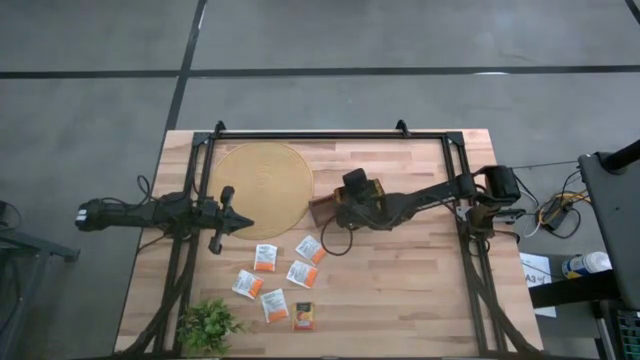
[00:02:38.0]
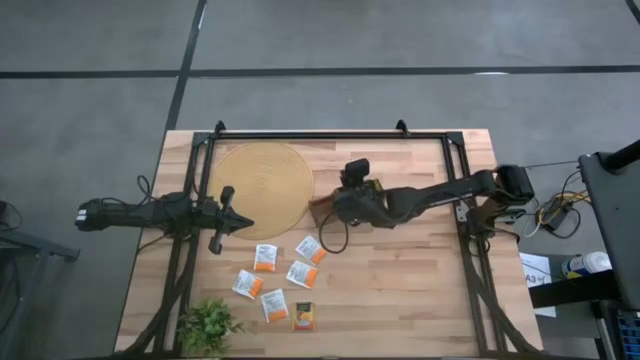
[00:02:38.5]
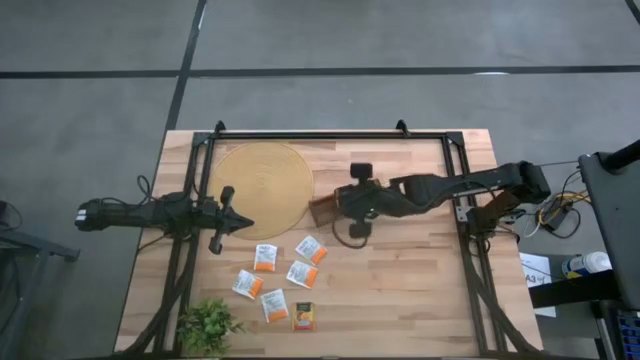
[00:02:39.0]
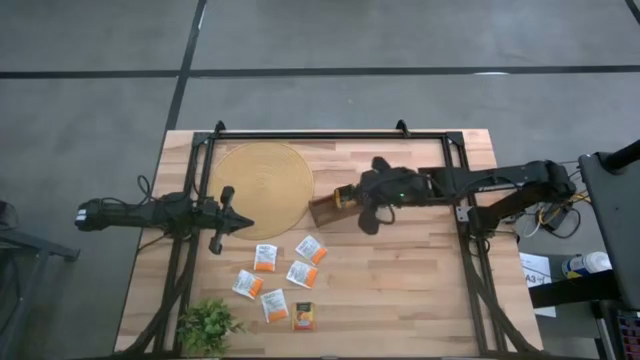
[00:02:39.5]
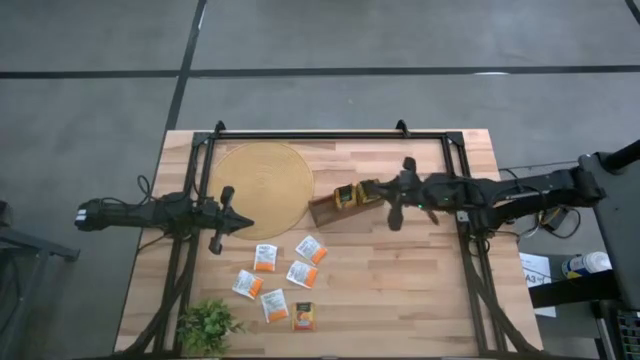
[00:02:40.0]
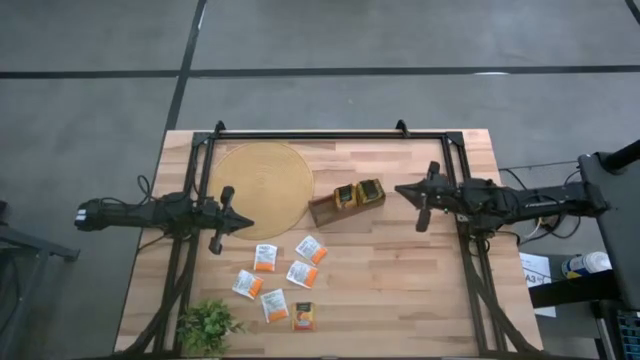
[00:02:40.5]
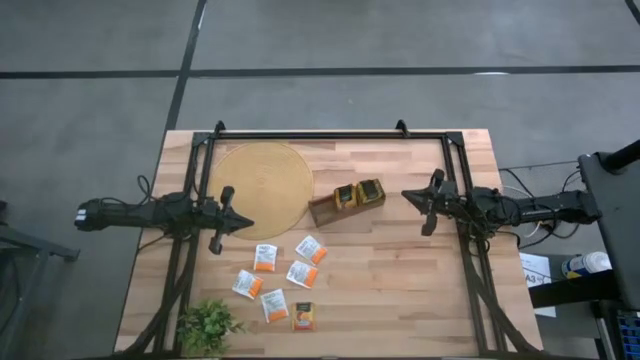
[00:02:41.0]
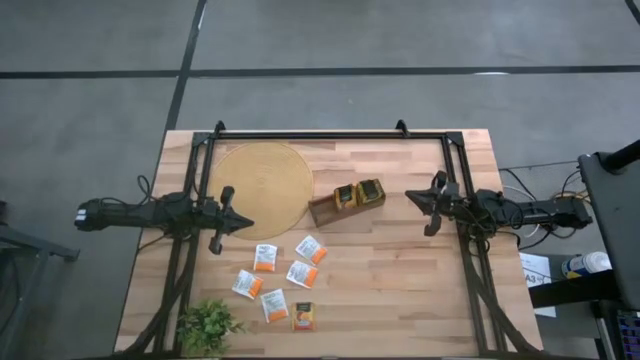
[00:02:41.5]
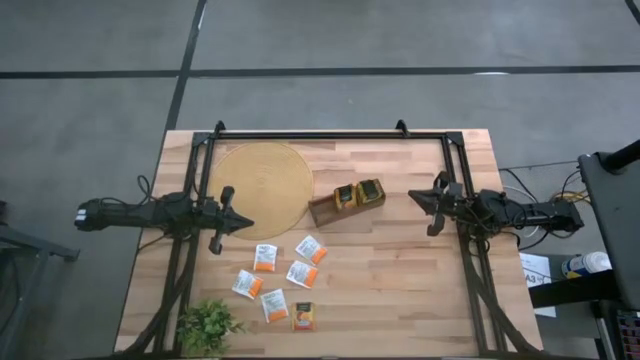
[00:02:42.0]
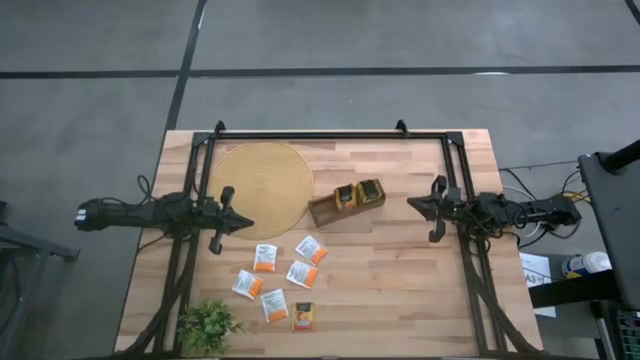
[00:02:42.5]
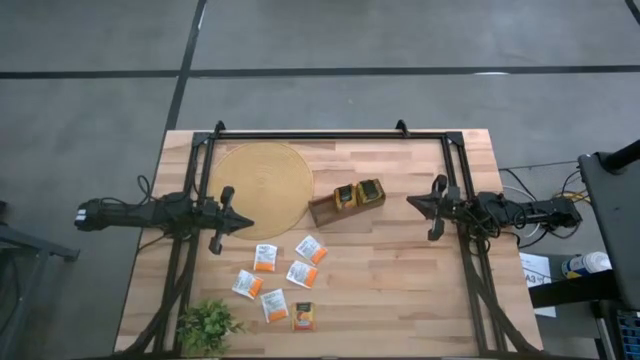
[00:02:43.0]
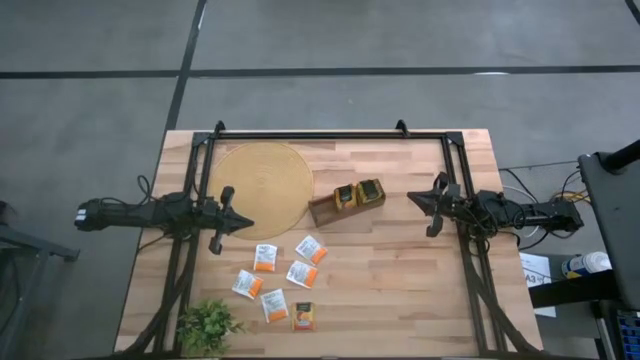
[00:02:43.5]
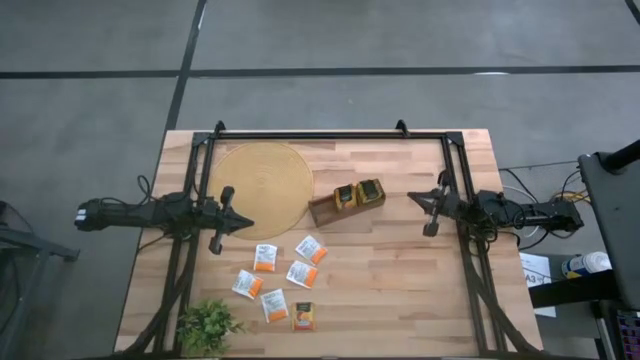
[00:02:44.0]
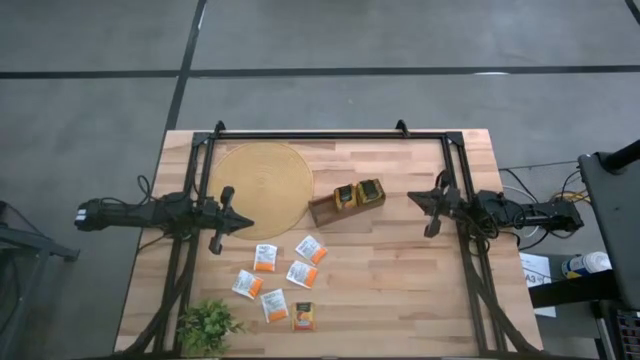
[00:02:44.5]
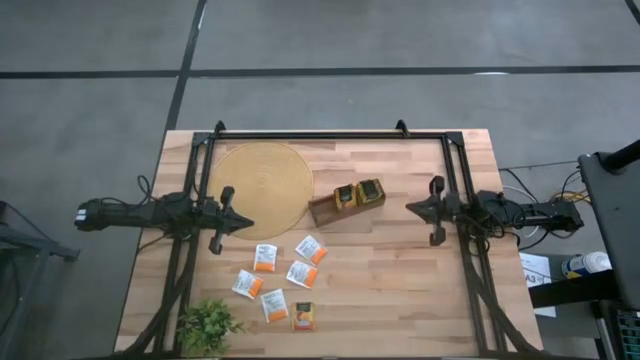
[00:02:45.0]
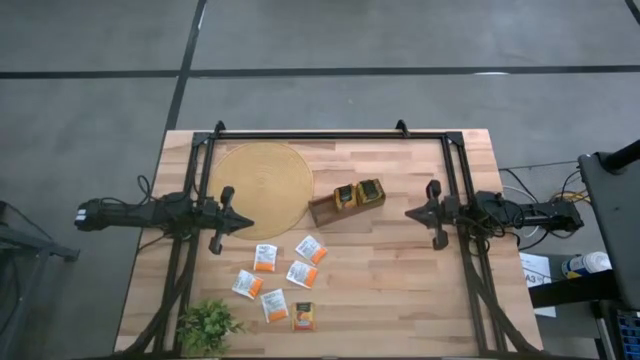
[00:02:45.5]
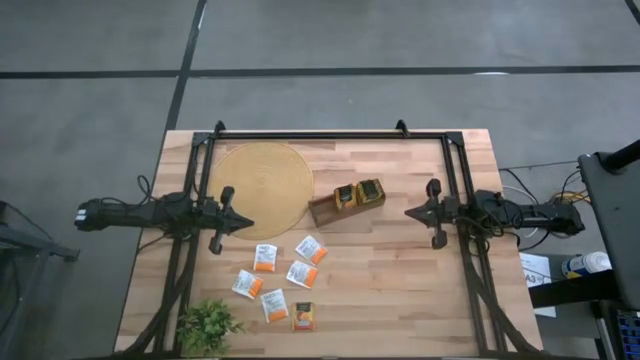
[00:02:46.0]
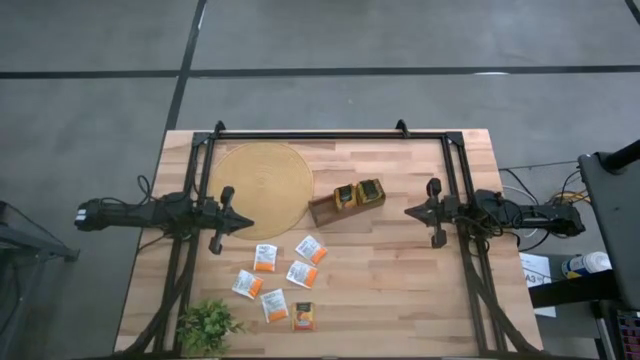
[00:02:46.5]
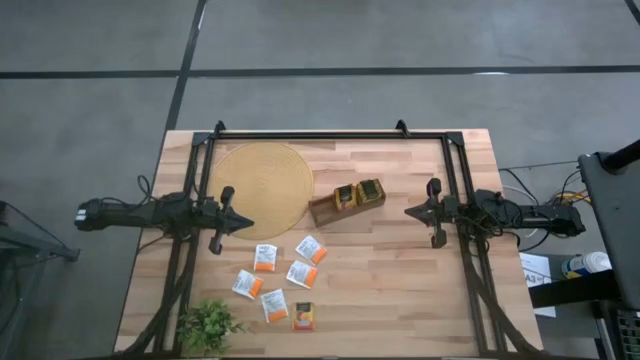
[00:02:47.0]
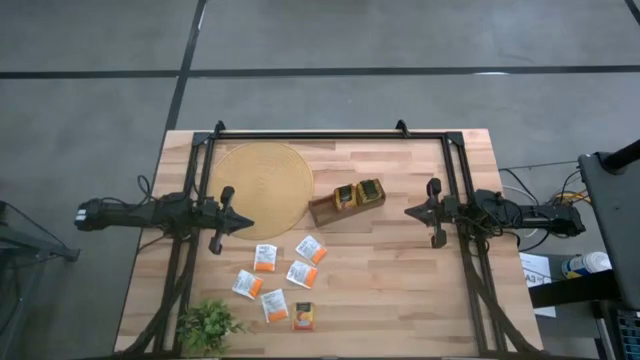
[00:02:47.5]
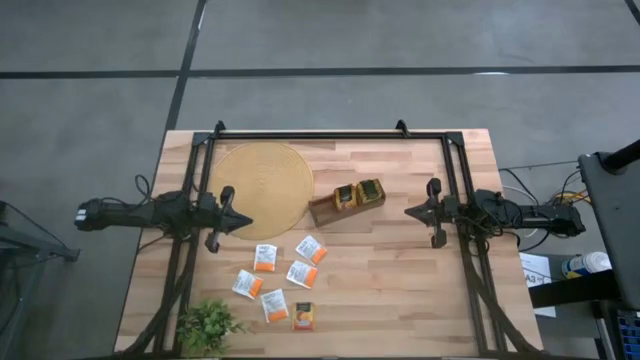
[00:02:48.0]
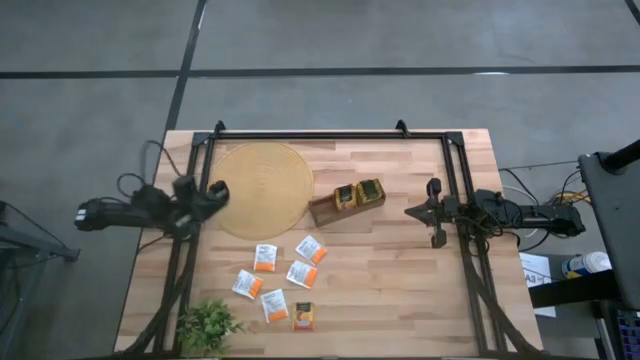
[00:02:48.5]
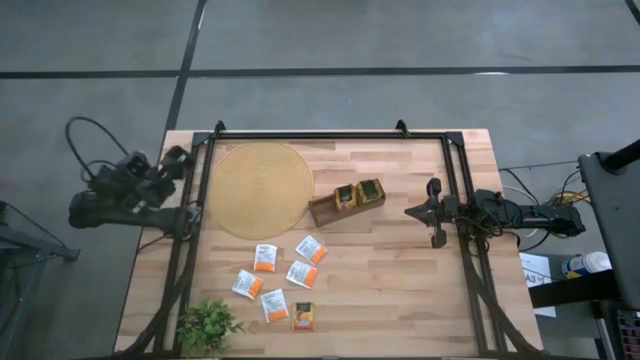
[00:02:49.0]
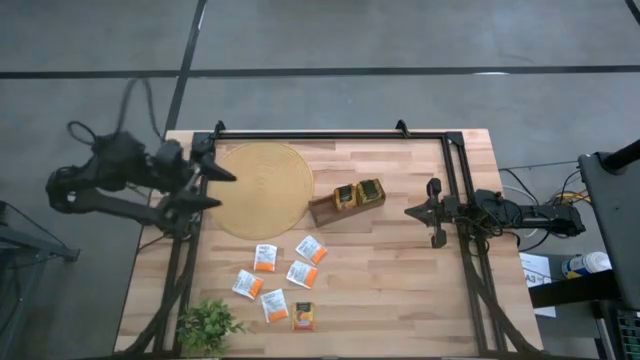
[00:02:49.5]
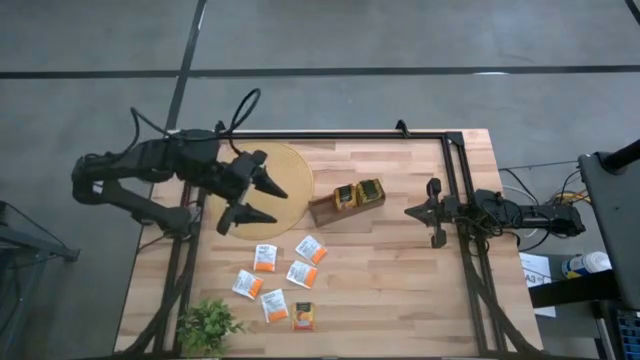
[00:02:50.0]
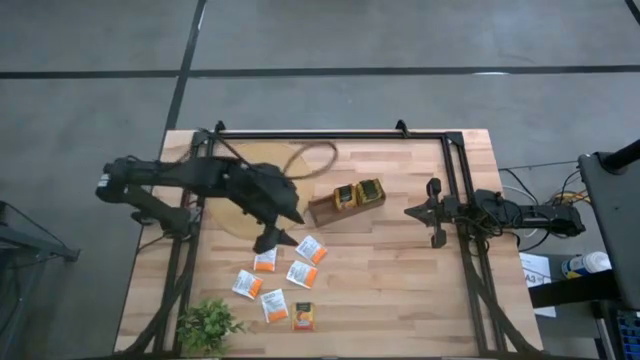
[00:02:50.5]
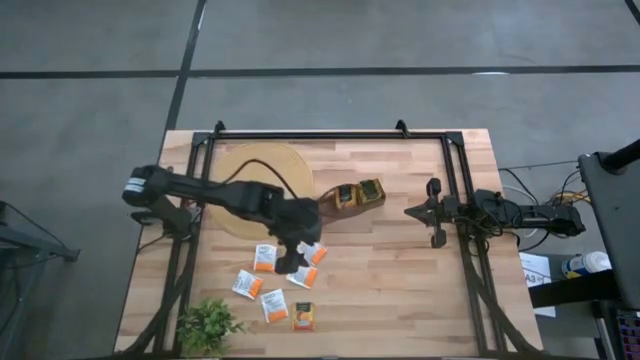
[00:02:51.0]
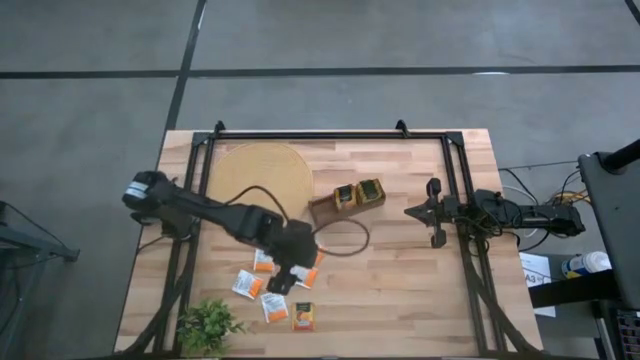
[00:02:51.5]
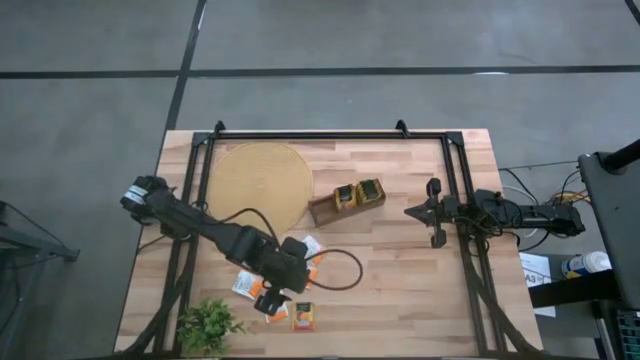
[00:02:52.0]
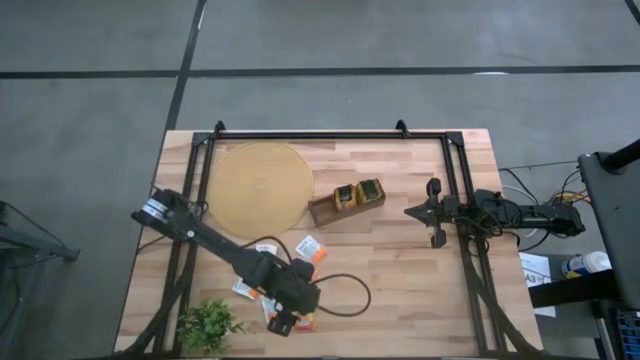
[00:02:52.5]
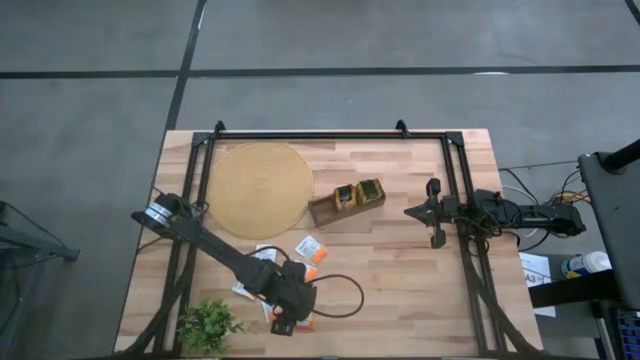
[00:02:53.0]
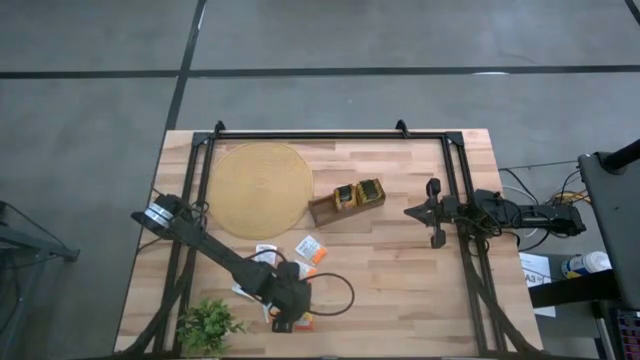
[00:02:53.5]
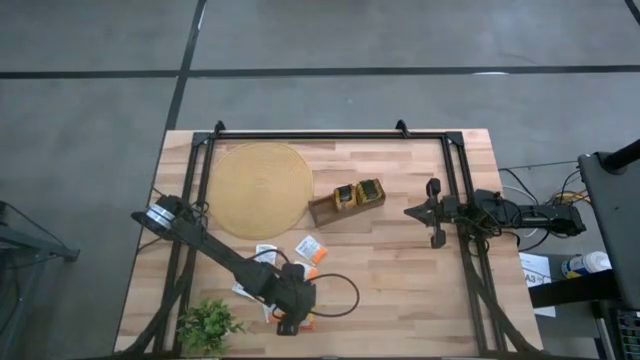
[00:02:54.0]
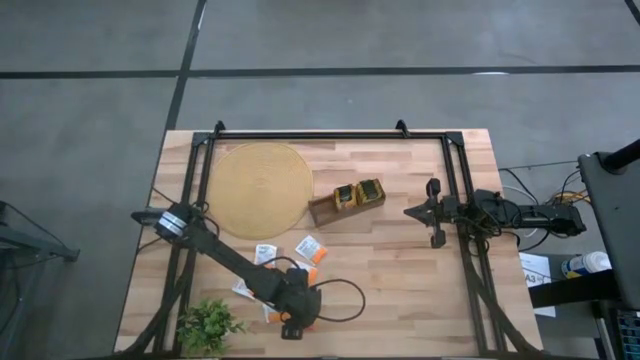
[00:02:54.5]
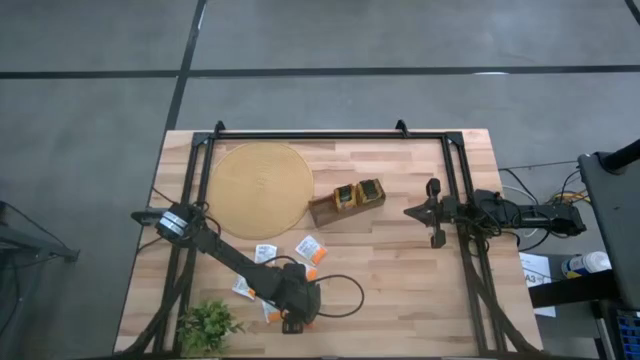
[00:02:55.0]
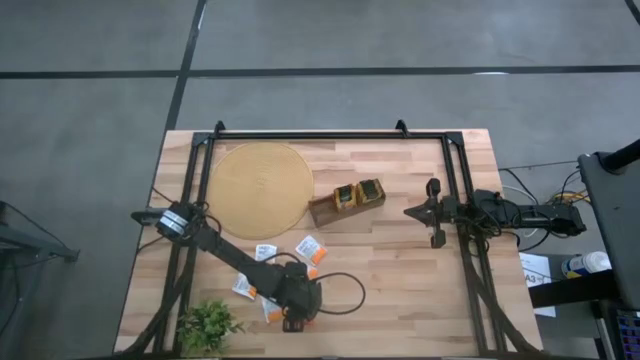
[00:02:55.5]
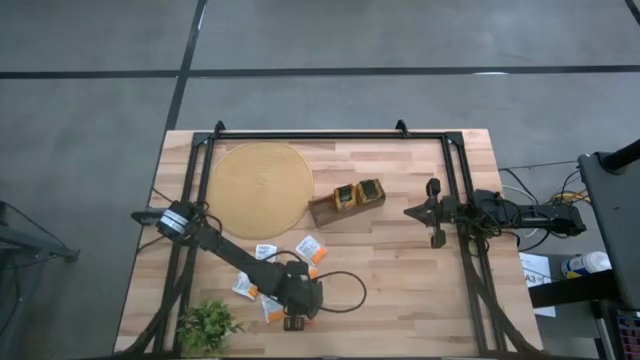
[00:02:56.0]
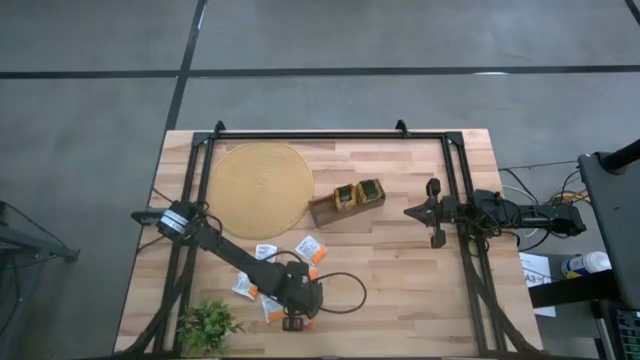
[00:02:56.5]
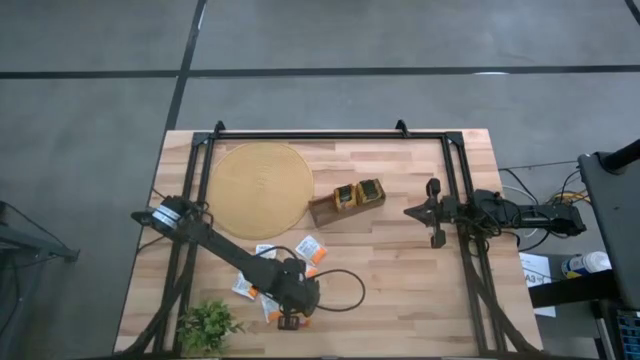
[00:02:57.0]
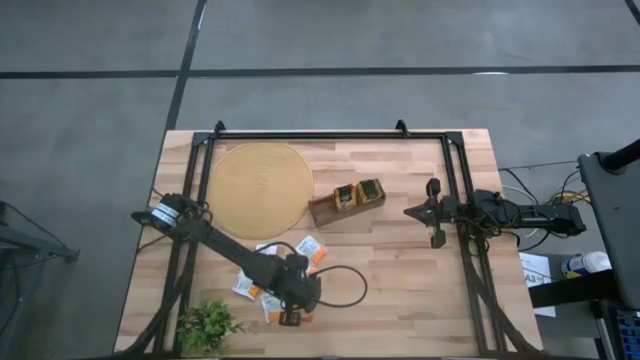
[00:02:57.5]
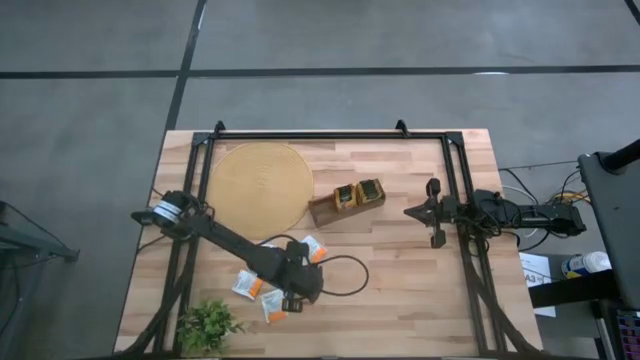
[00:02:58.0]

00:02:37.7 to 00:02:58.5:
Task: Pick & Place Tea
Put the orange tea bag into the middle section of the wooden organizer
